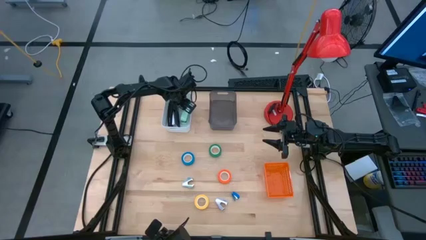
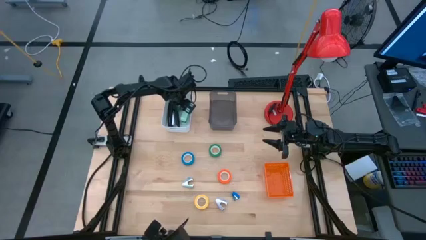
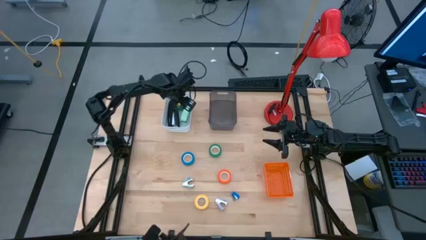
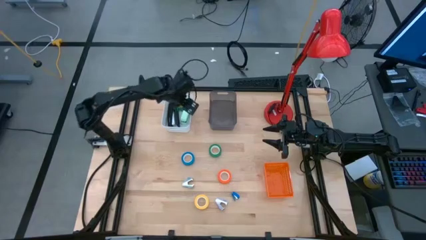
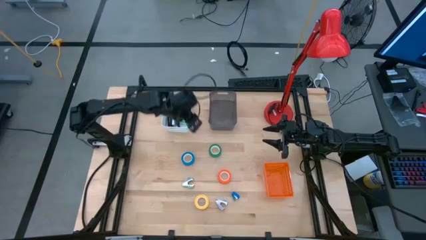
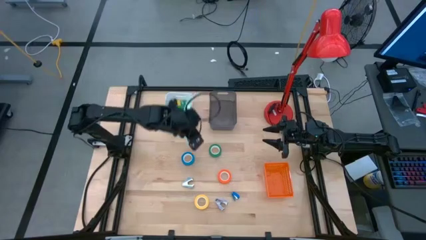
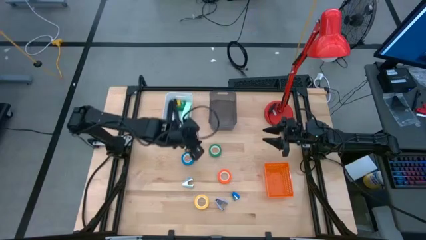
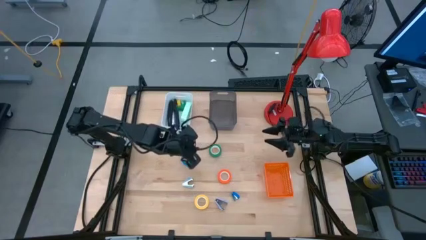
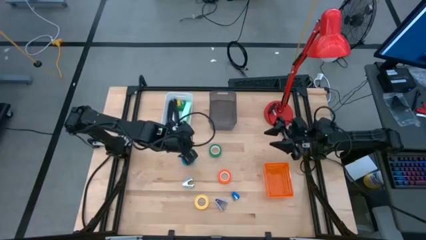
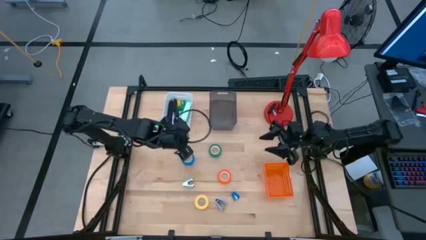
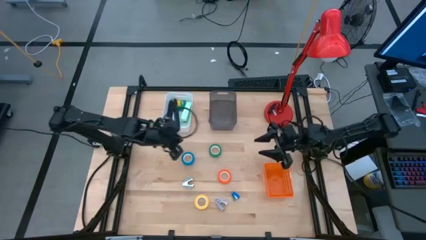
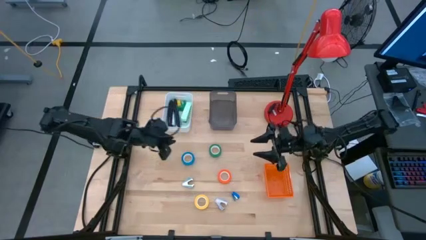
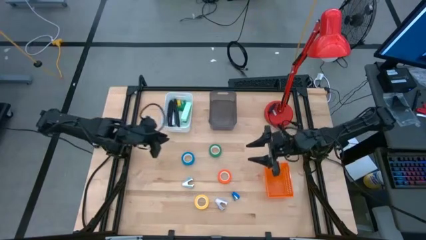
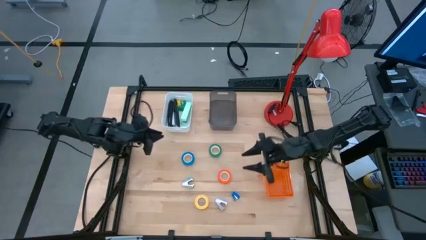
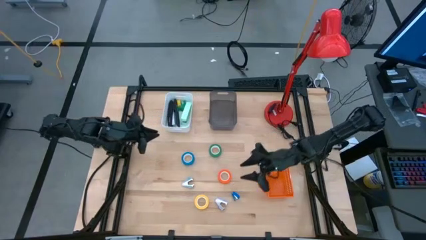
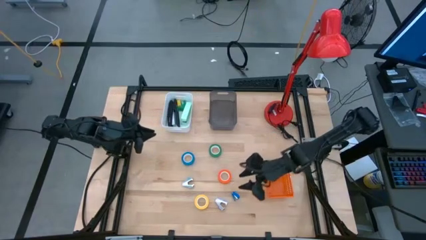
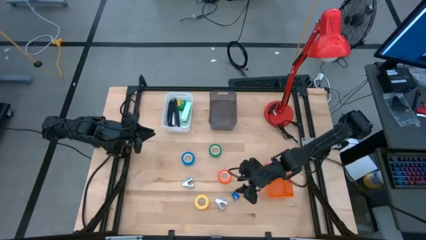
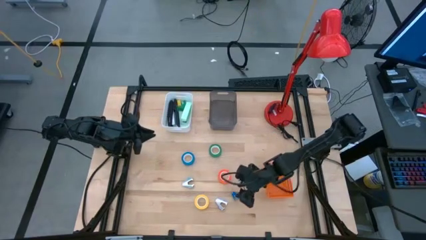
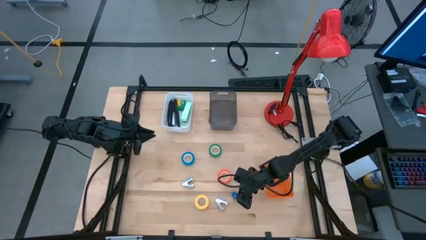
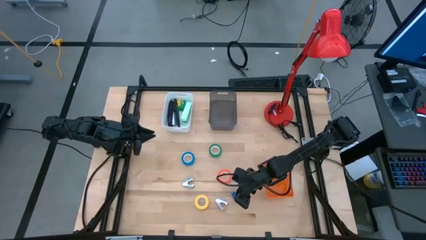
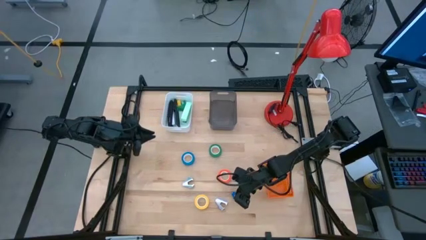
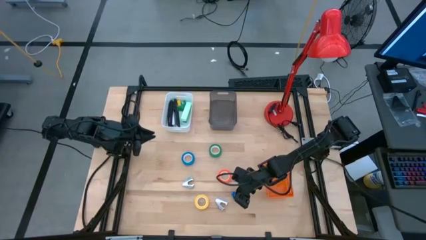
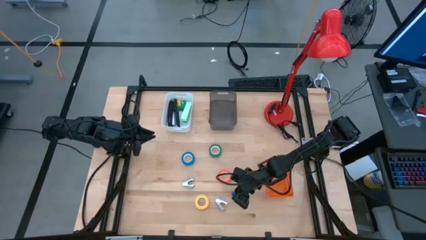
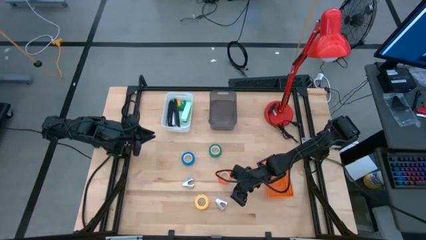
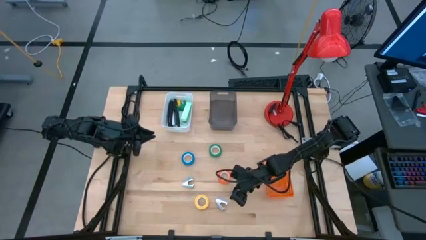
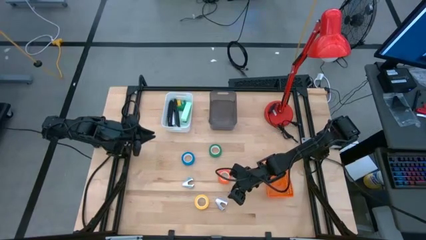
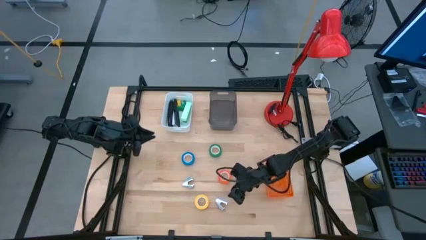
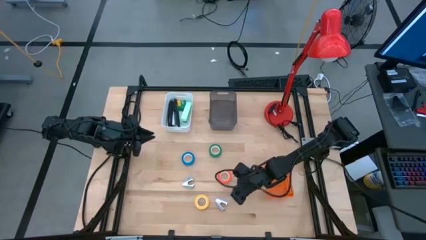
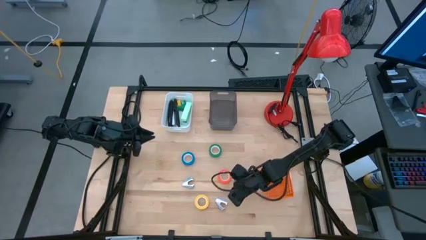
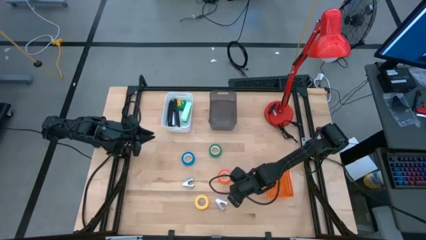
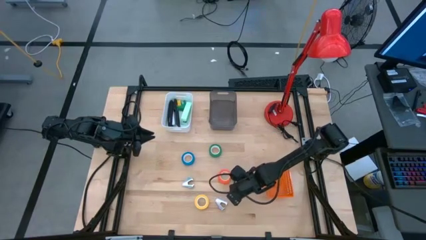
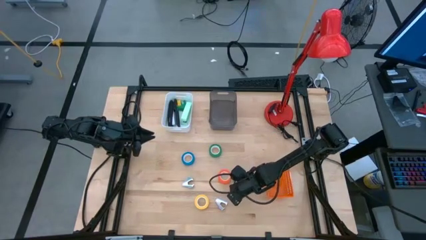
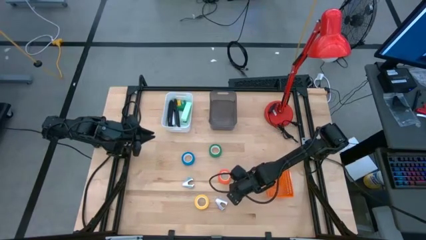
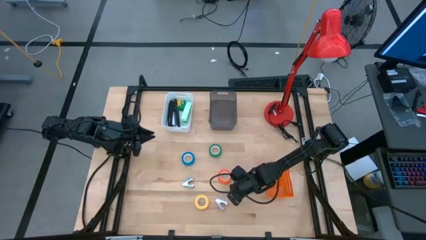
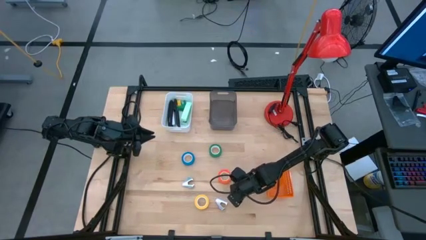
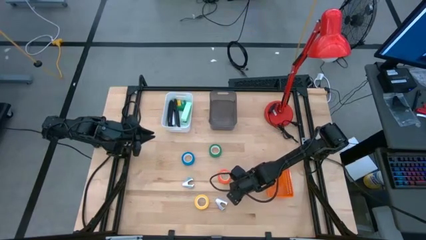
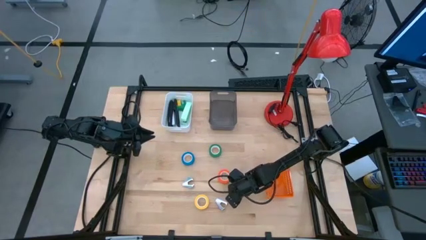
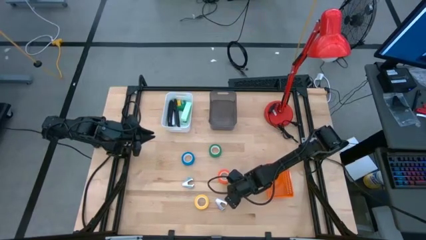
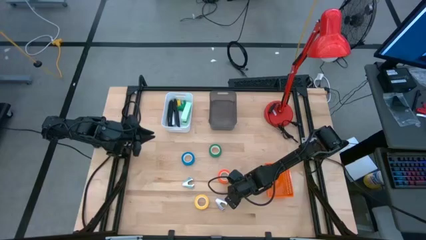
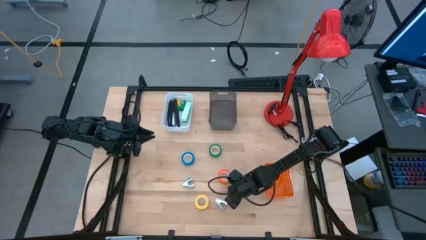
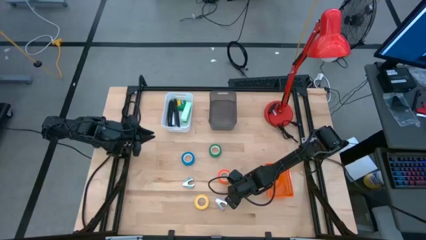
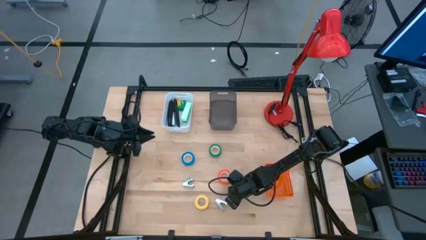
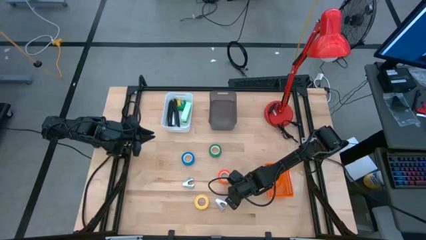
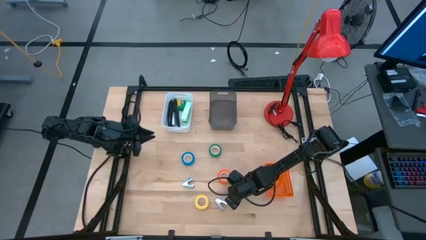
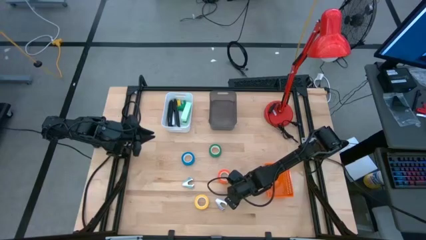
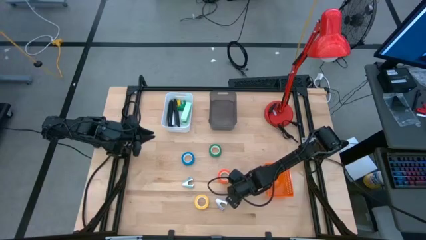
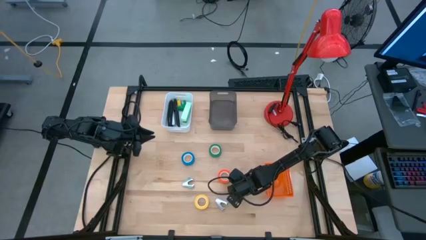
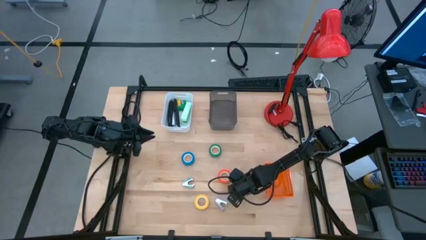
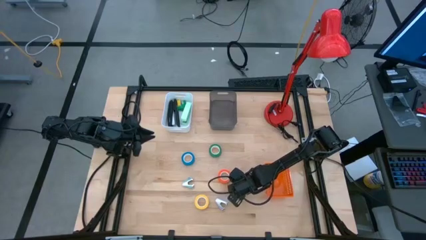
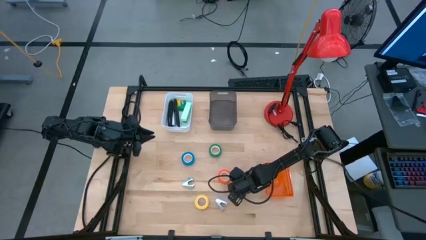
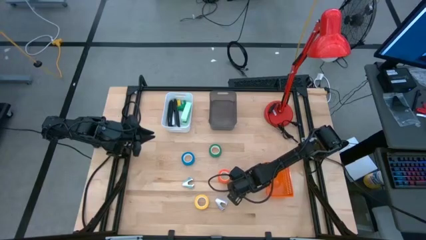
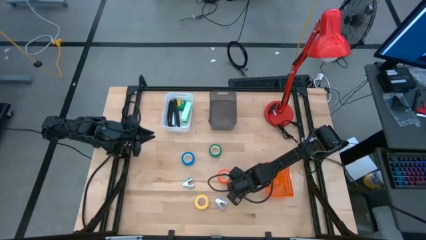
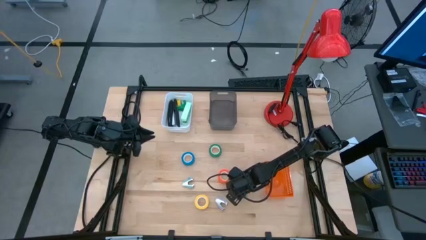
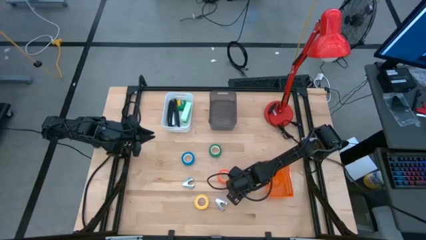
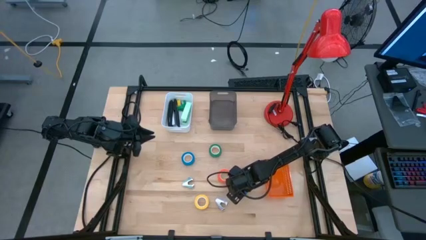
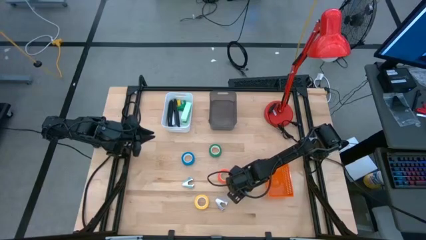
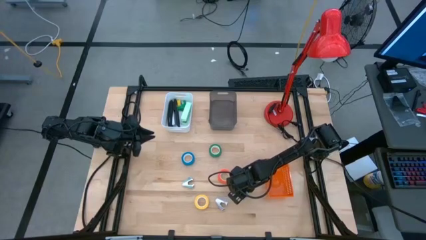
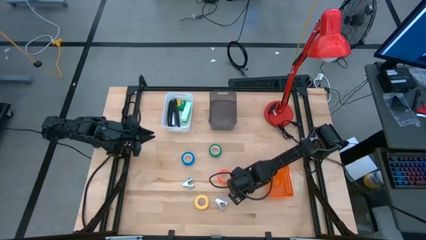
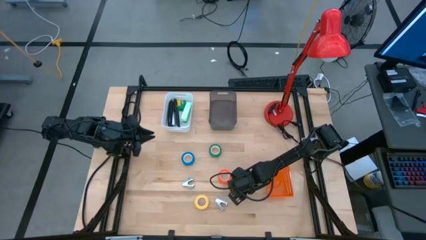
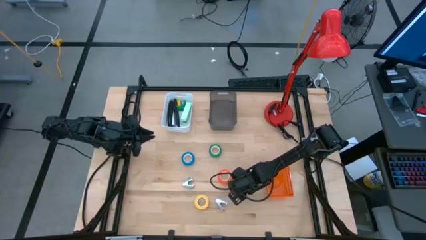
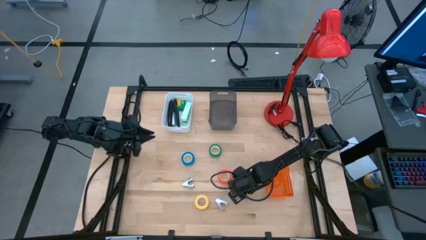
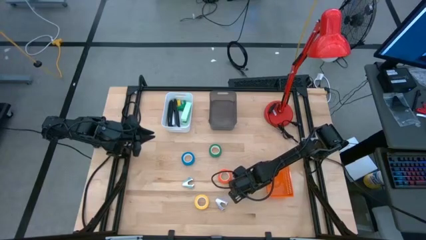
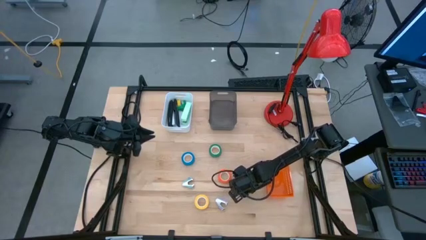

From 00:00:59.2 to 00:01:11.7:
Task: Pick and place Stapler, Stapler remover, tape
Put the blue stapler into the white bin
